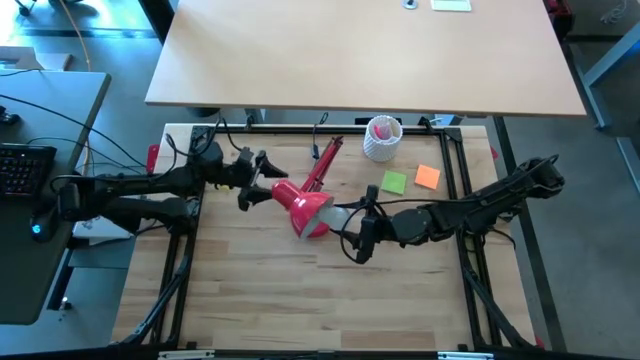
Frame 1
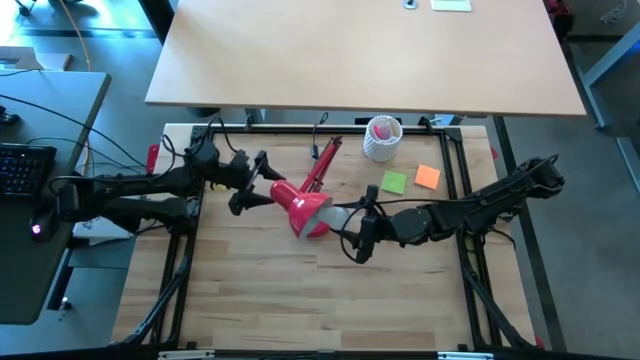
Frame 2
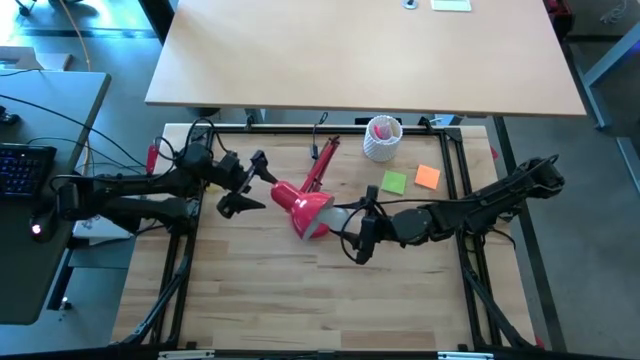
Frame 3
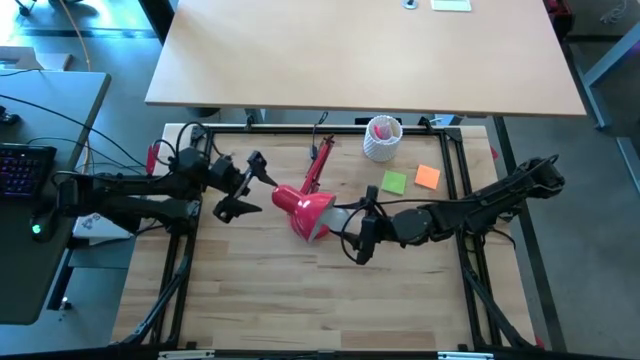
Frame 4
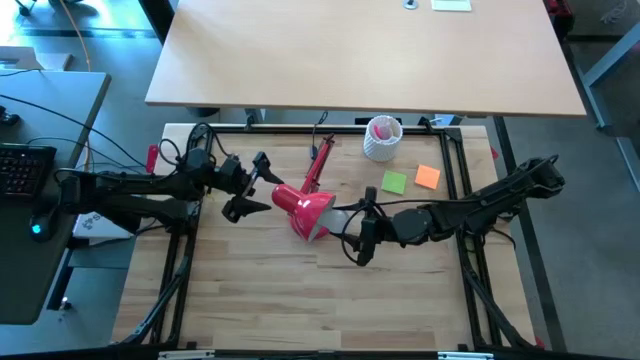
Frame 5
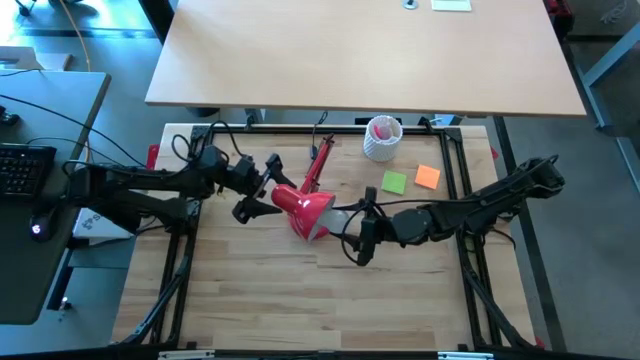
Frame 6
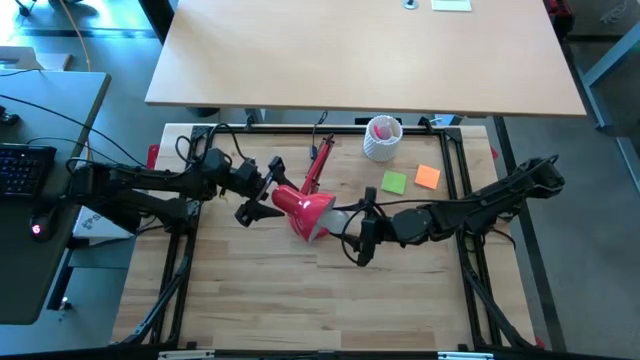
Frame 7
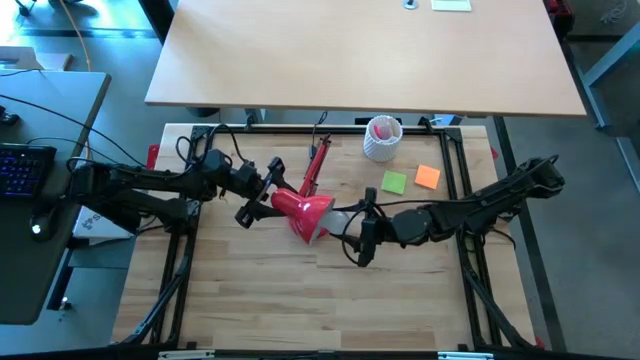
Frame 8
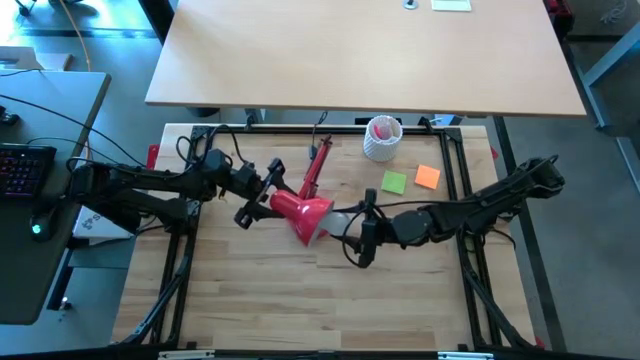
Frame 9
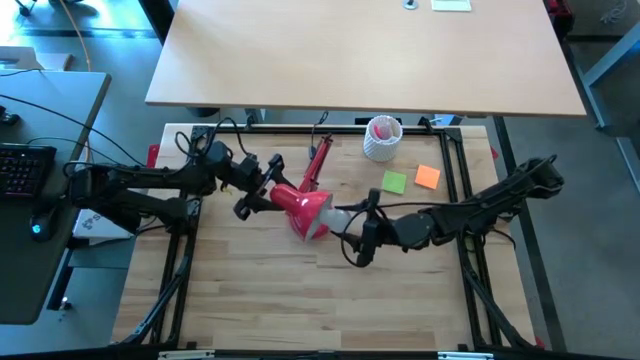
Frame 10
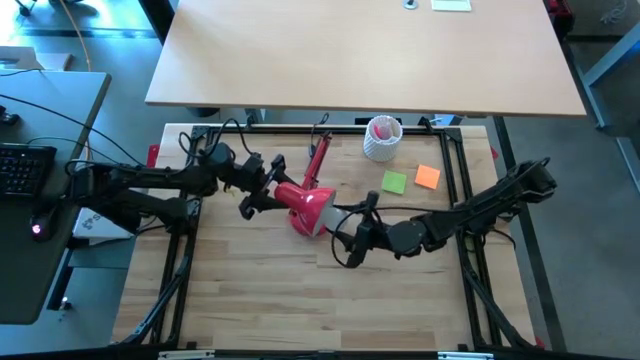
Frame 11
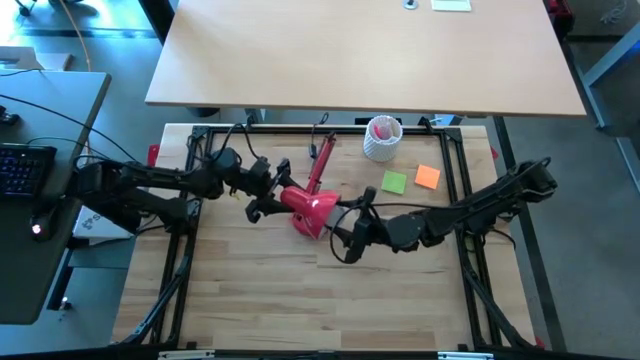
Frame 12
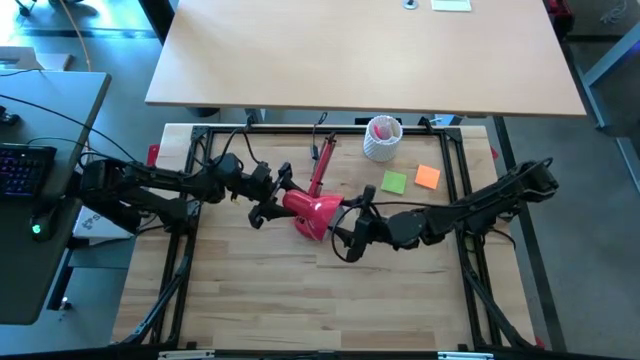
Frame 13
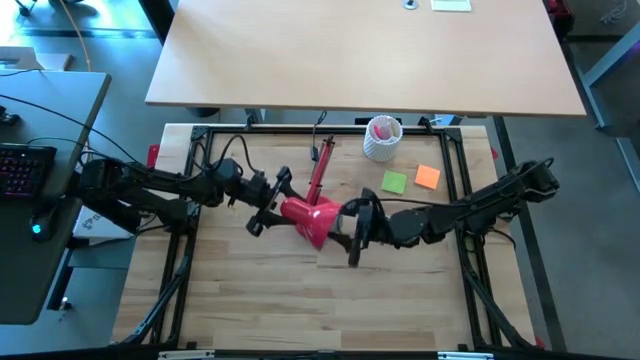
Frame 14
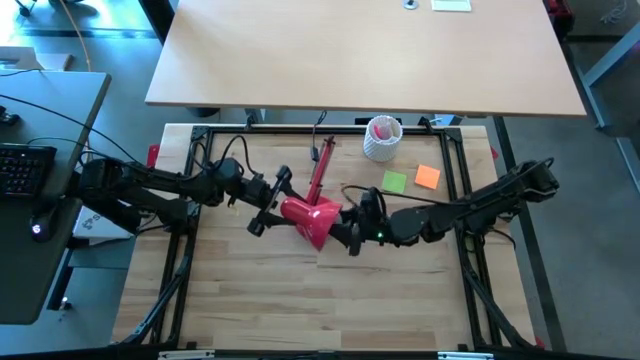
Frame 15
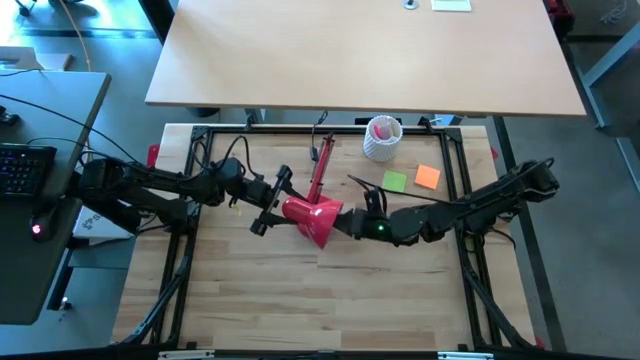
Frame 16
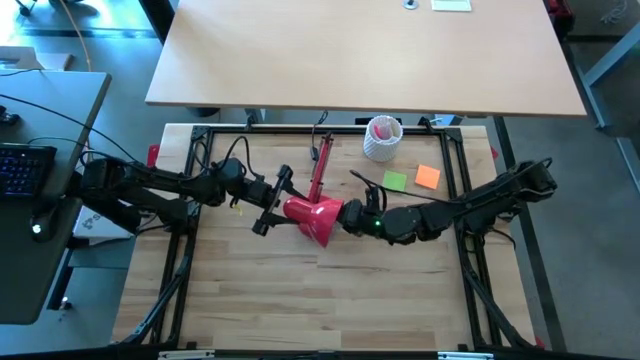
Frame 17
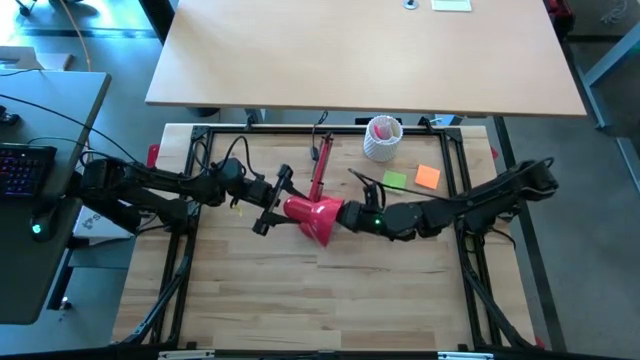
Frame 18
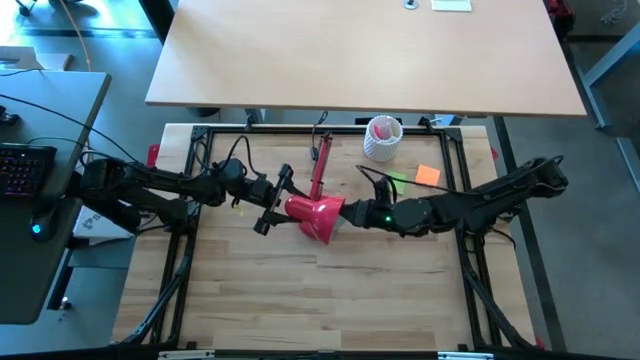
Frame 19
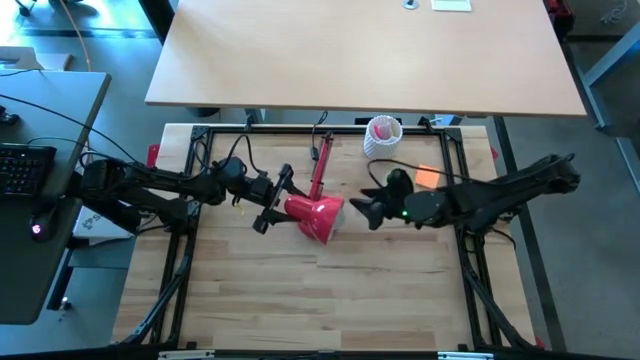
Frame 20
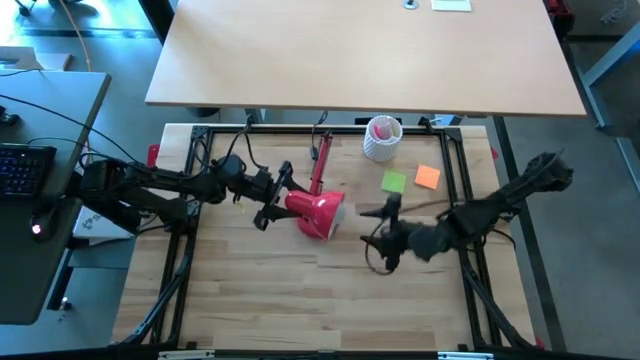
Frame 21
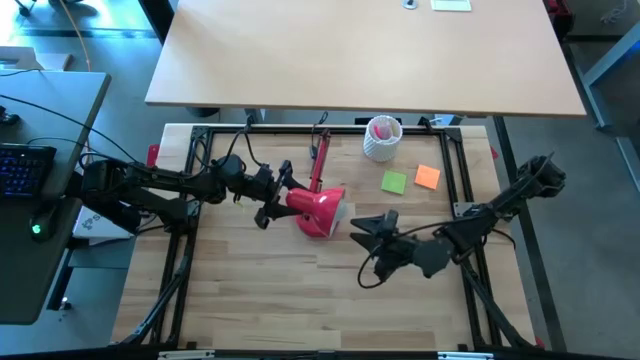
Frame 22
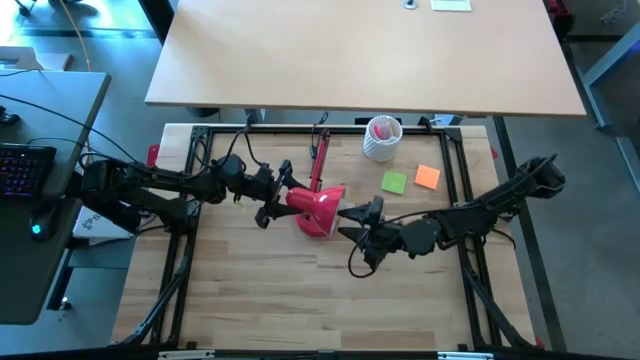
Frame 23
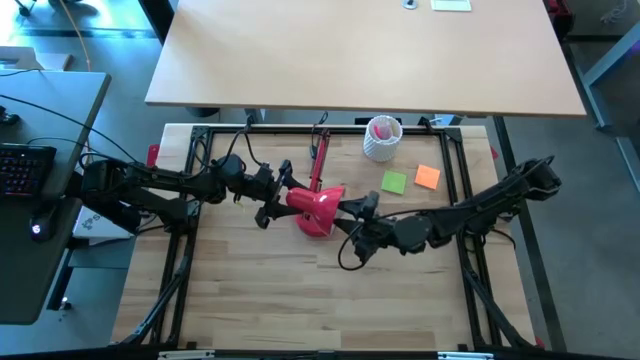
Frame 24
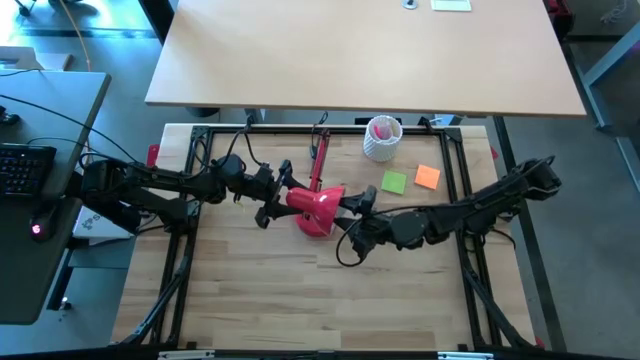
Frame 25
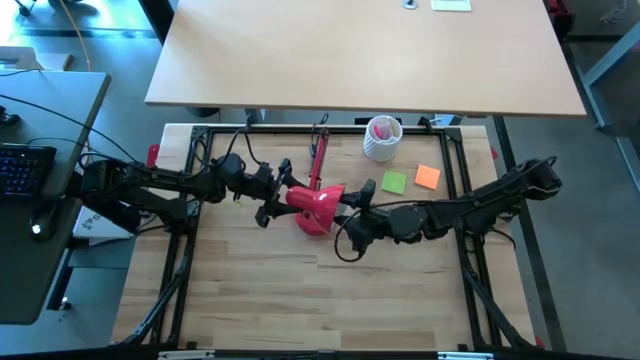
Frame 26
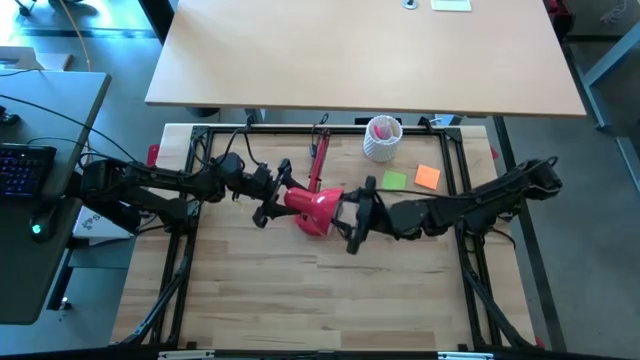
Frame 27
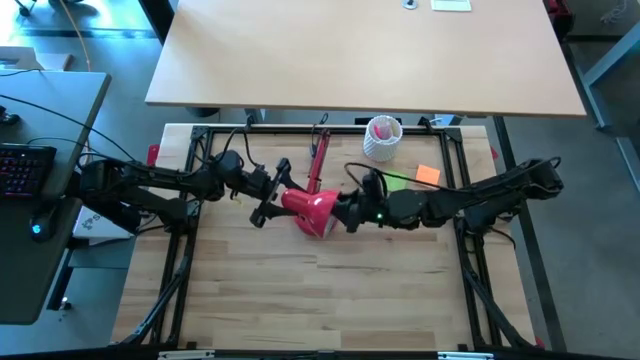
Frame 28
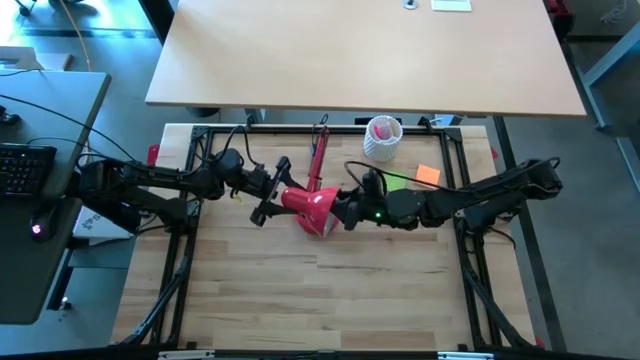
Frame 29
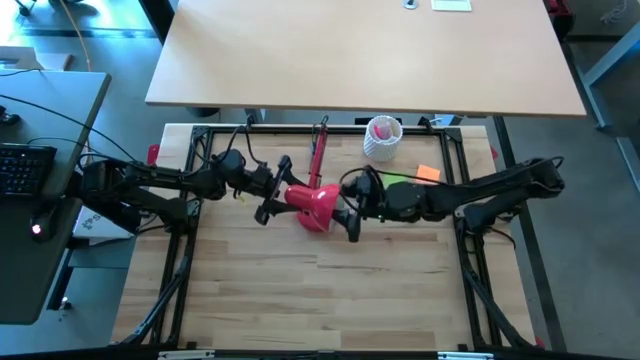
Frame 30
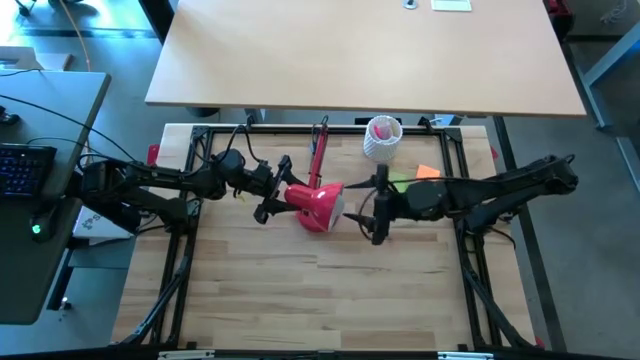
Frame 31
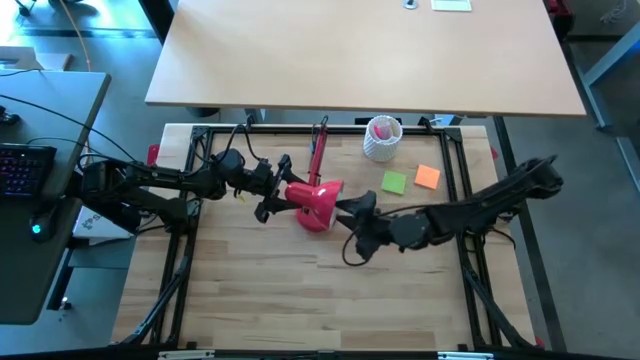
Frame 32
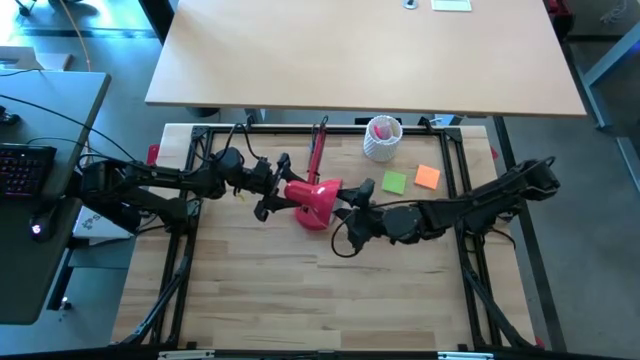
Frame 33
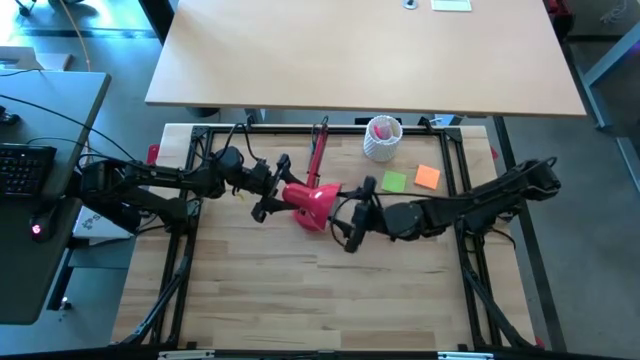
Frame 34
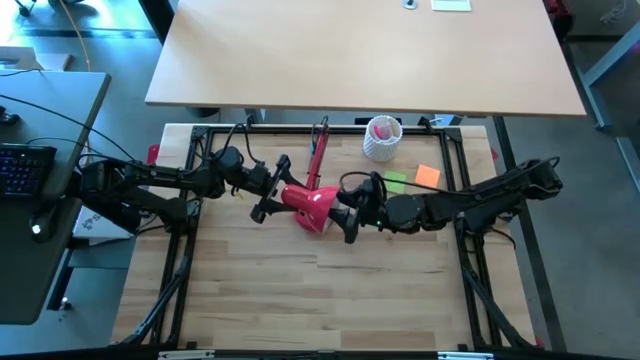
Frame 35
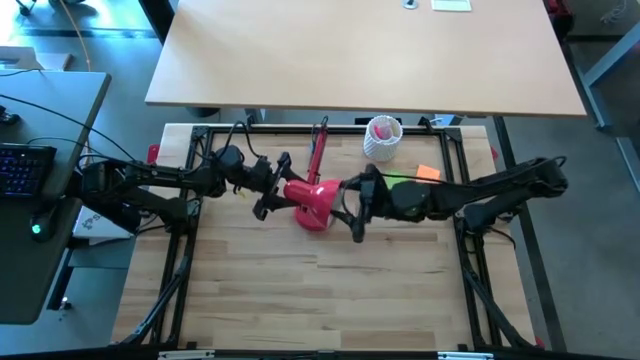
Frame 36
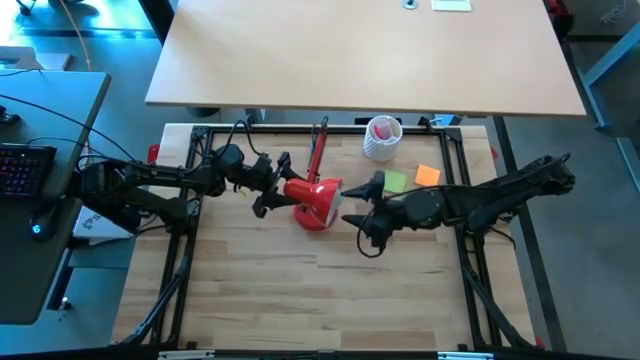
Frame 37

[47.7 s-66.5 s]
Task: Screw lightbulb
Insert the white lightbulb into the red lamp

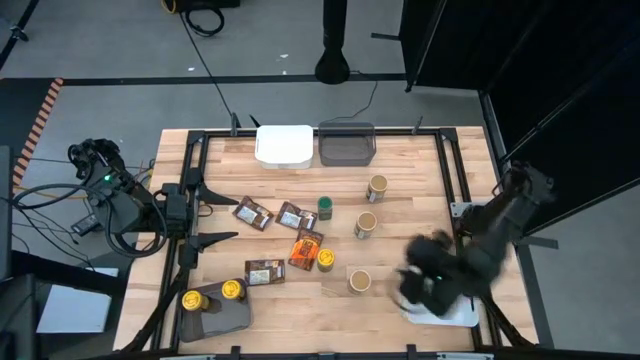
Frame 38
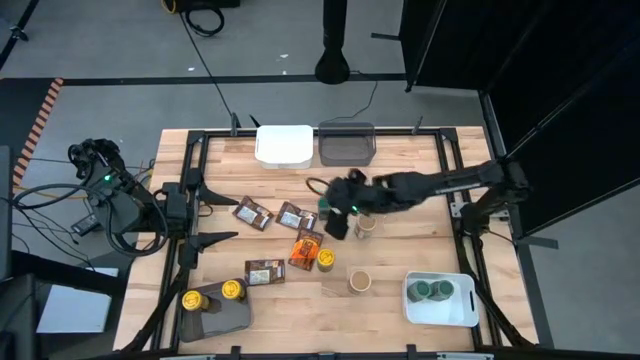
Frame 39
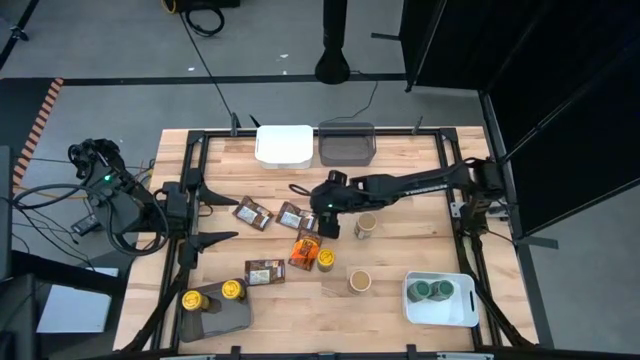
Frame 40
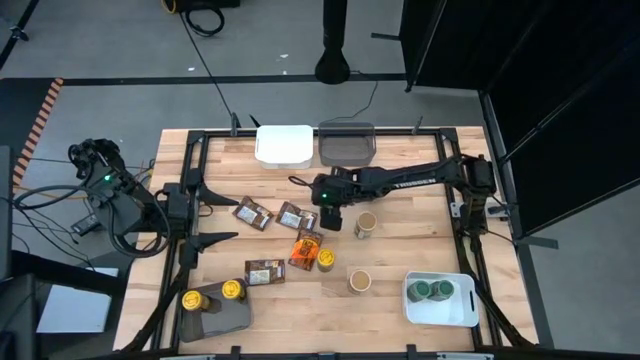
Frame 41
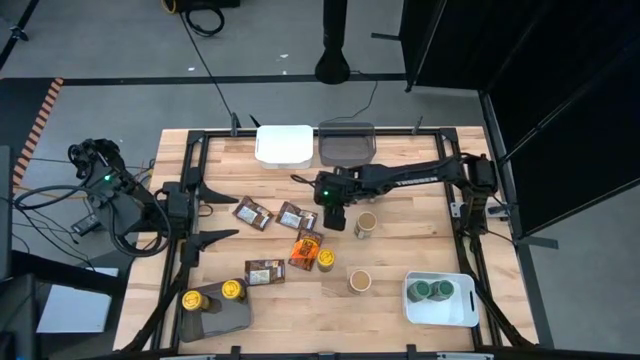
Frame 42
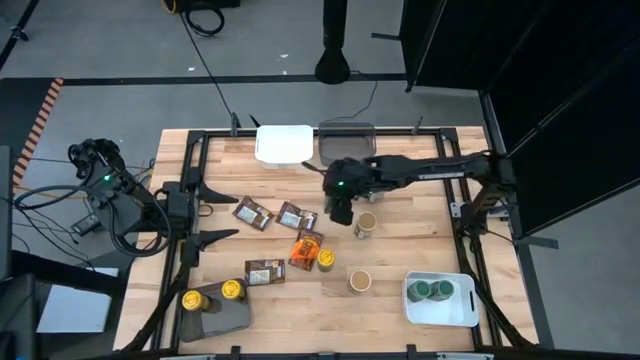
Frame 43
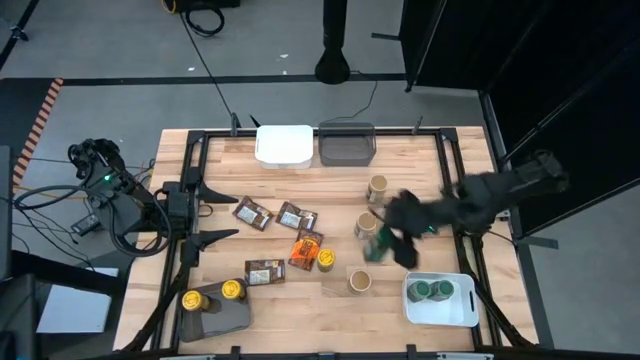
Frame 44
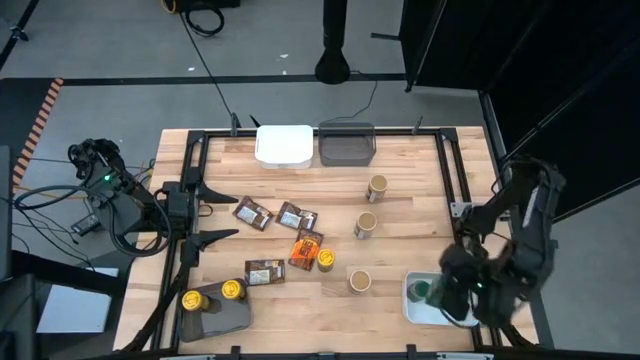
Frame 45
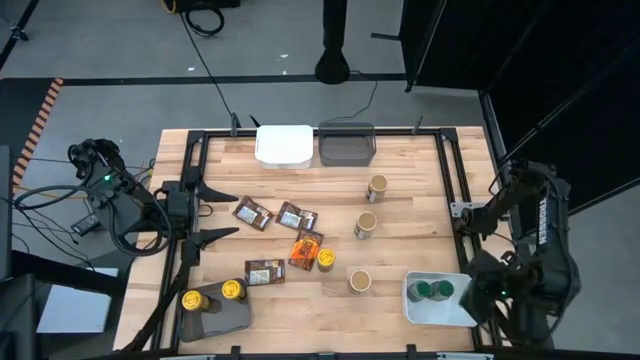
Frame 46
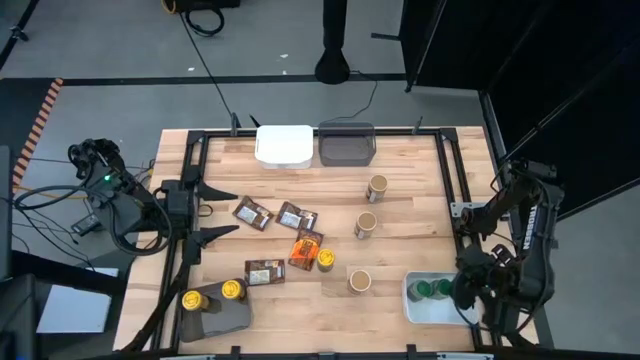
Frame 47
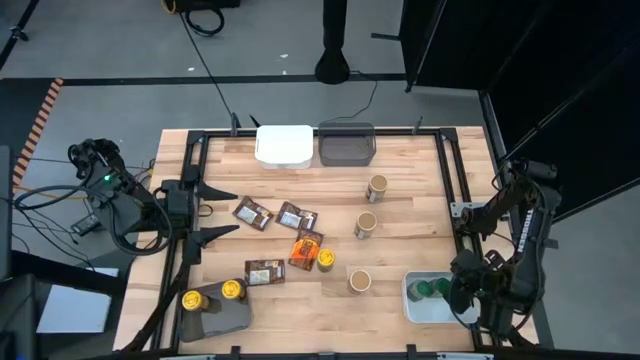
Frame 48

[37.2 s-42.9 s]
Task: Sort spices by type
Put the green seasoning bottle into the bottom white bin
